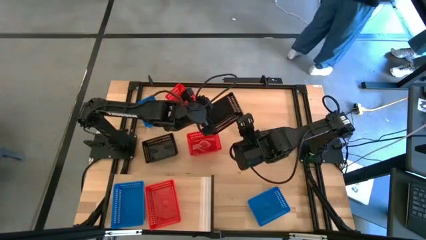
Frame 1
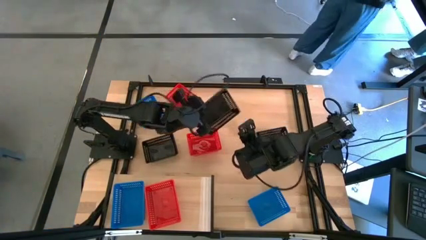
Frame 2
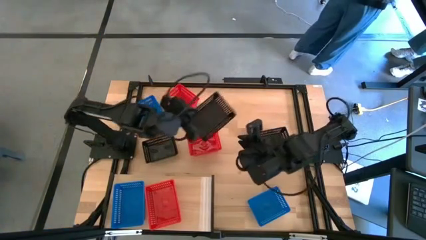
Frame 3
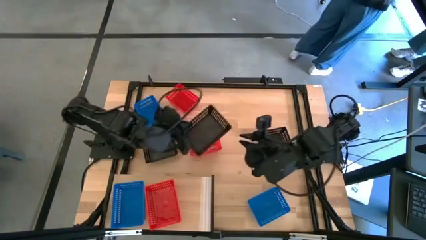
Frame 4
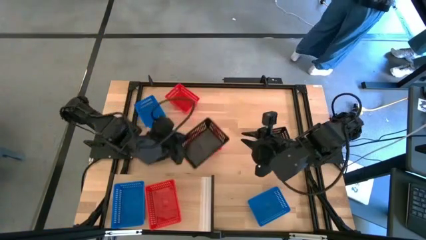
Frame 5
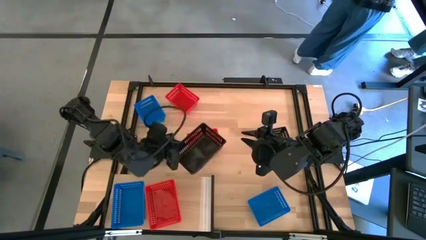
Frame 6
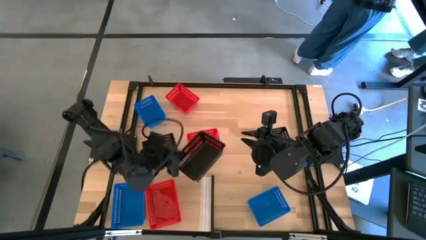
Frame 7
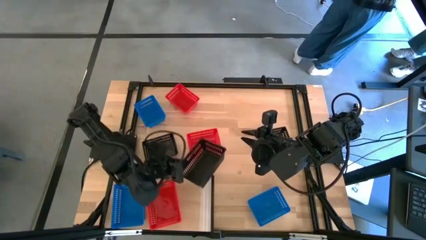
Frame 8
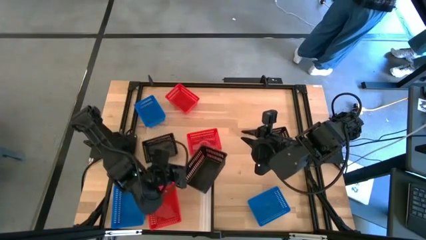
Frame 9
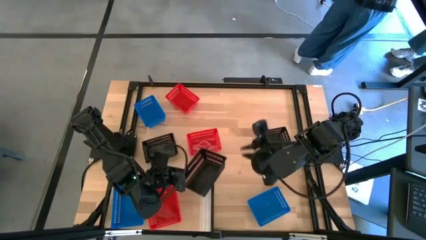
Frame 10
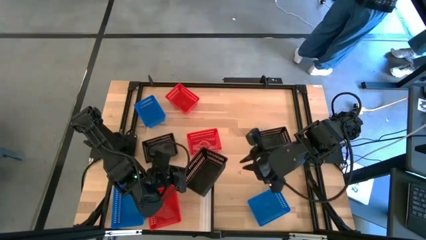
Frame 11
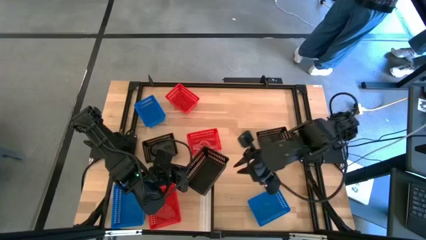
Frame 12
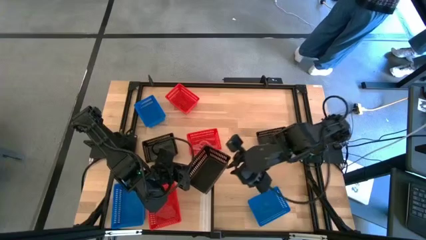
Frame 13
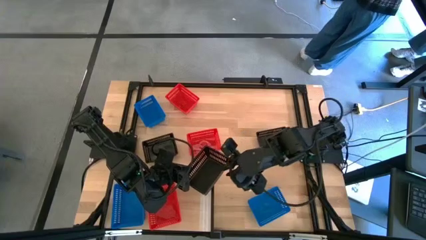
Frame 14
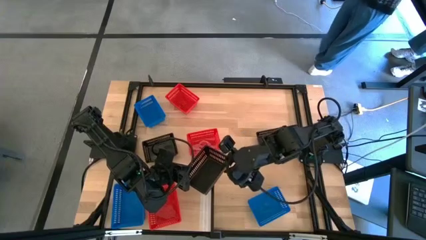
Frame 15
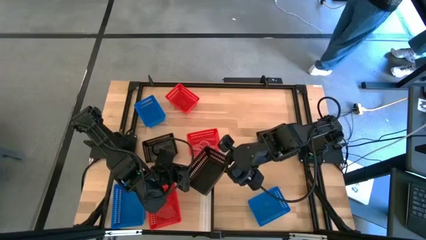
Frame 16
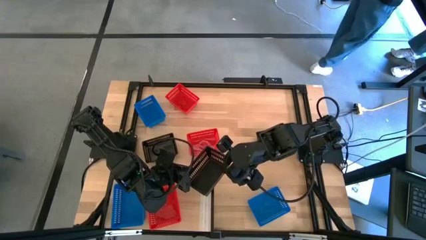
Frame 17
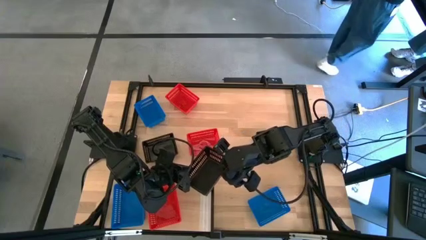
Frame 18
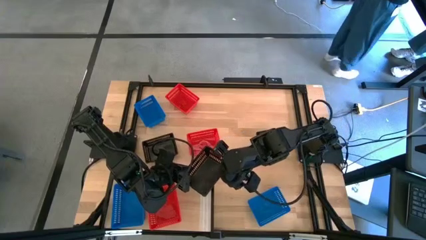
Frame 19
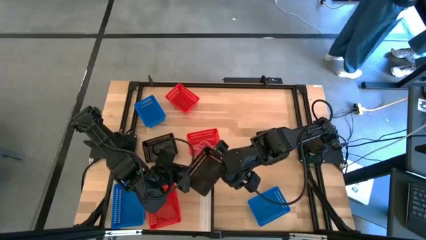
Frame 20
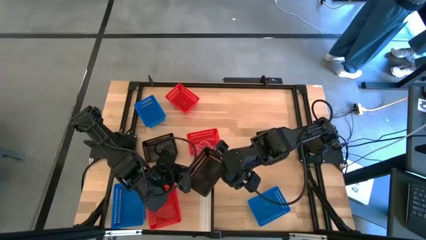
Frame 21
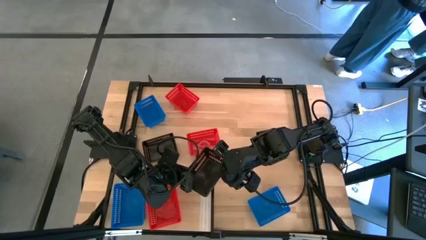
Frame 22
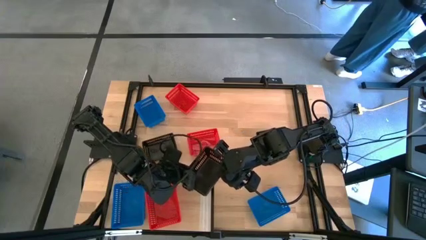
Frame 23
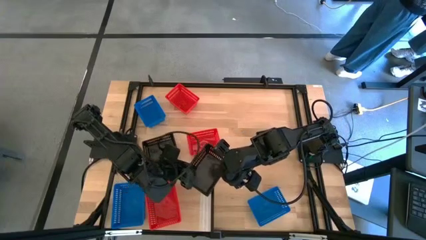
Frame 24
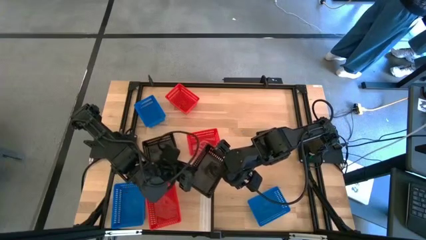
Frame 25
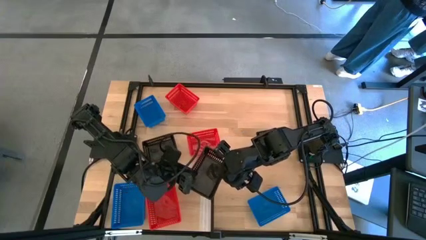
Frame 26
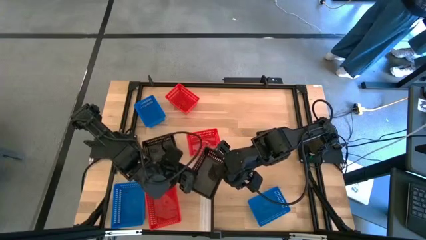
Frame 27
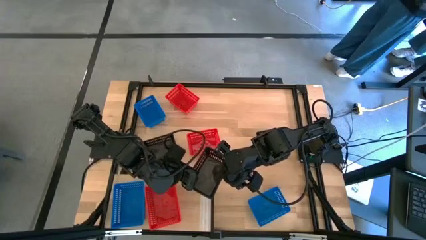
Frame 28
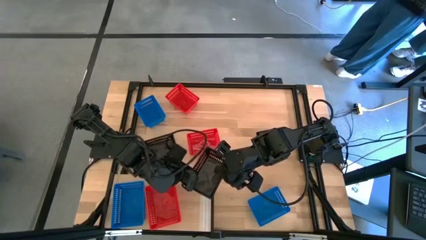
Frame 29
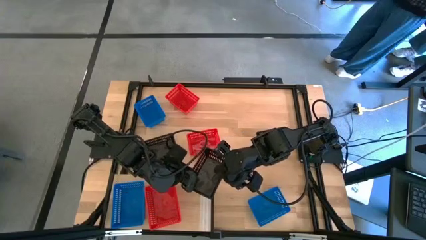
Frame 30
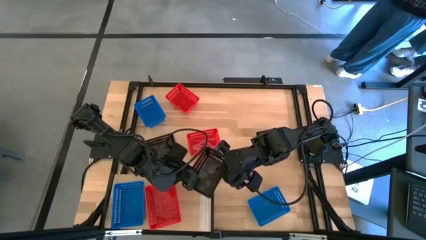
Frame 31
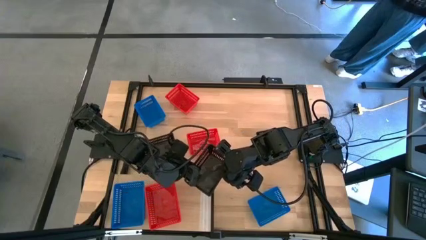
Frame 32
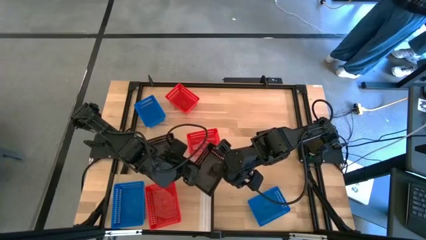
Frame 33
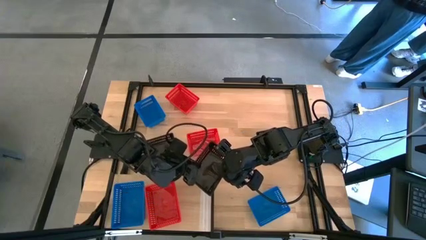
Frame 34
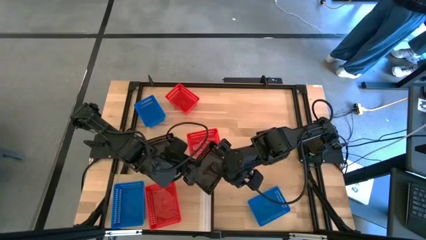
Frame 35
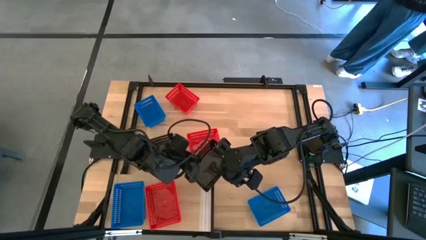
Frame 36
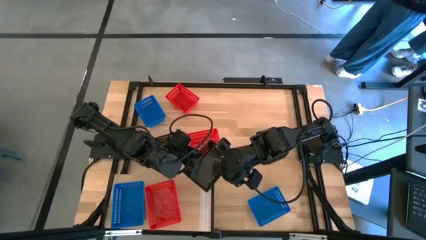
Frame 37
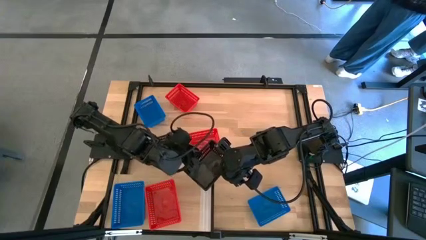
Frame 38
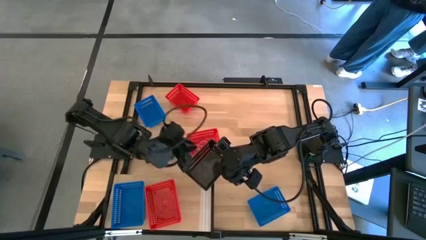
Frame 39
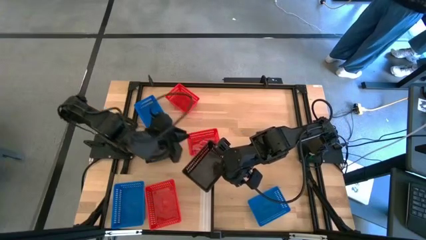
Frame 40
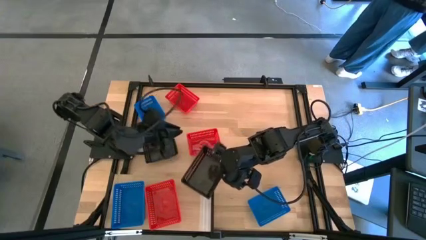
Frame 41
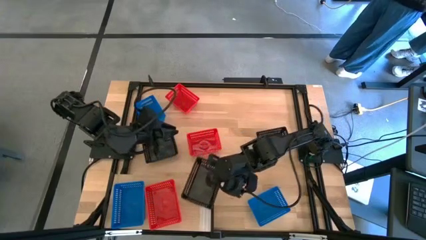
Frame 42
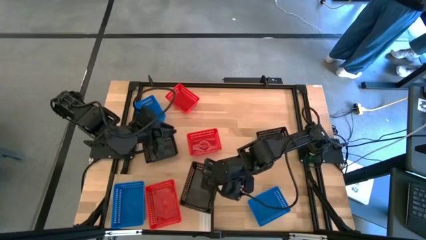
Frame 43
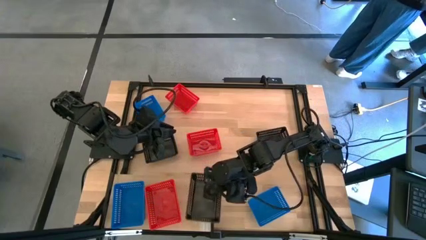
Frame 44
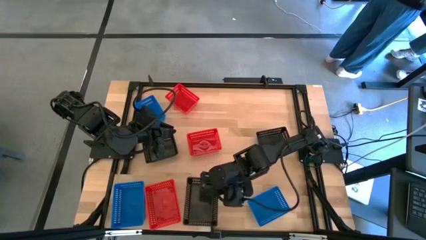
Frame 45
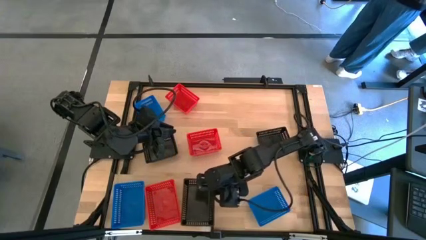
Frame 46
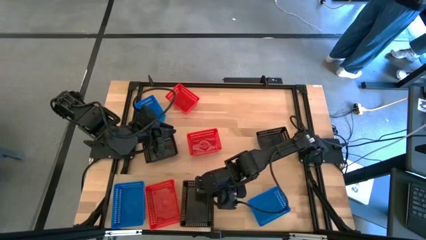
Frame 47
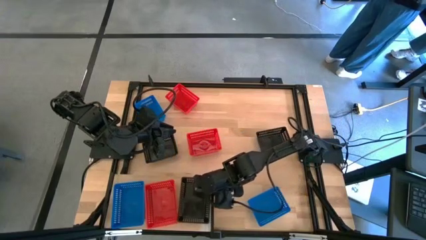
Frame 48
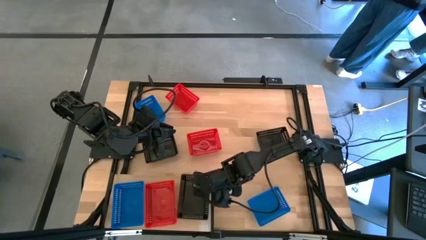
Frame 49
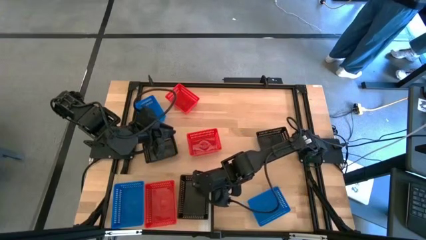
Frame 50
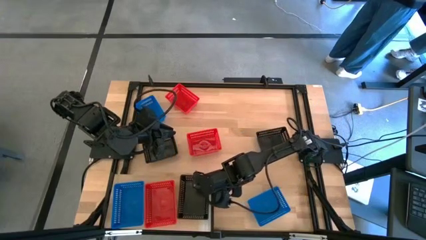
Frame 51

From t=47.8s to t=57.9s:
Task: Stack baskets on shelf by color
Put the center black bin on the shelf

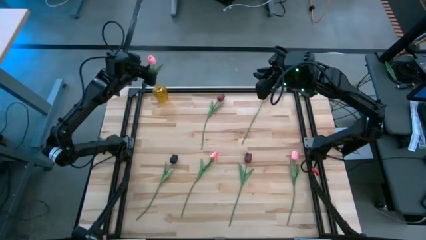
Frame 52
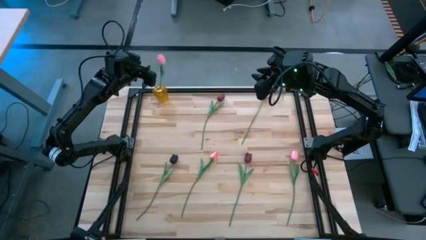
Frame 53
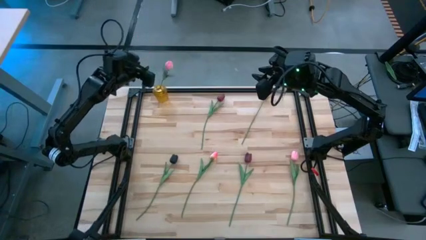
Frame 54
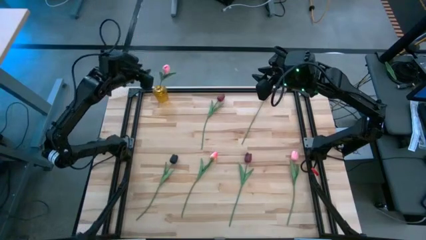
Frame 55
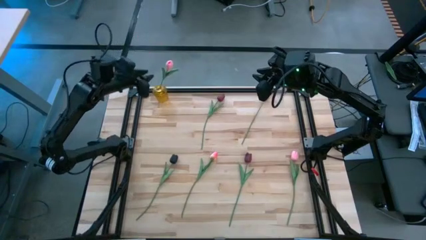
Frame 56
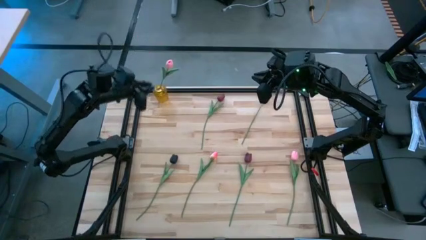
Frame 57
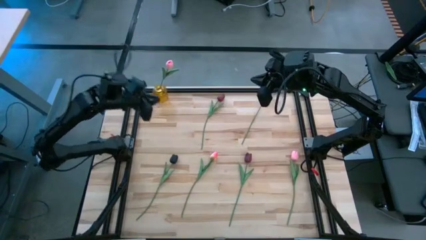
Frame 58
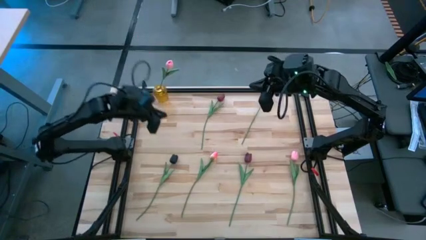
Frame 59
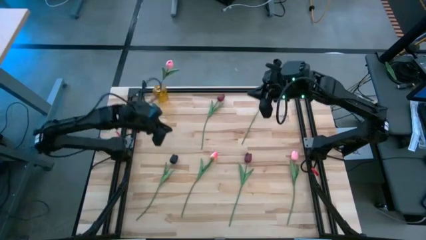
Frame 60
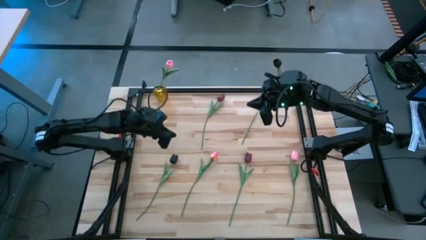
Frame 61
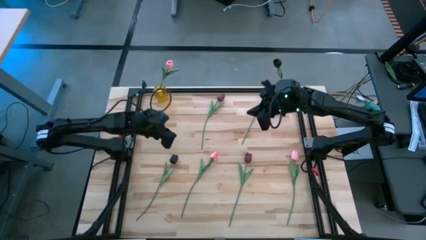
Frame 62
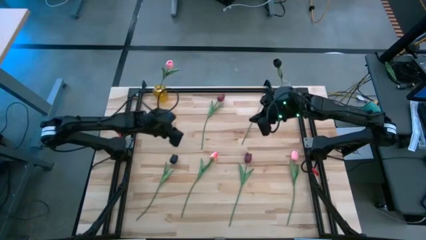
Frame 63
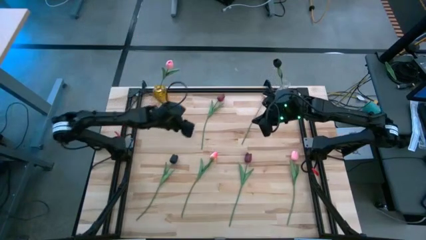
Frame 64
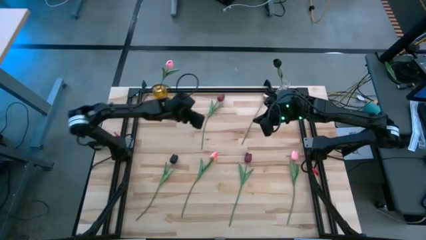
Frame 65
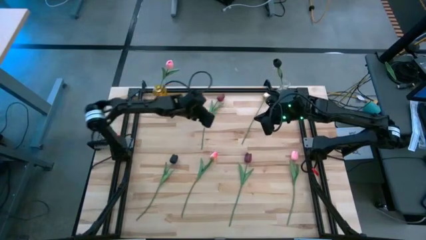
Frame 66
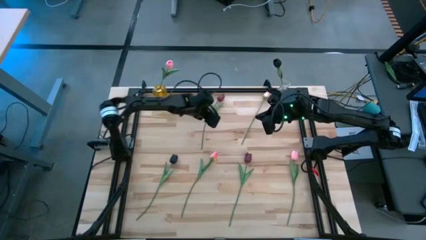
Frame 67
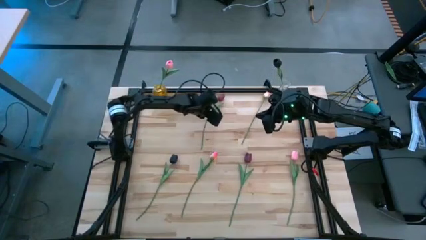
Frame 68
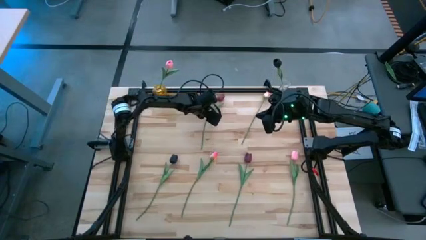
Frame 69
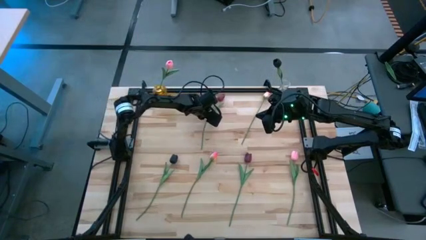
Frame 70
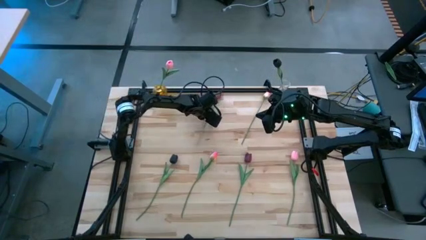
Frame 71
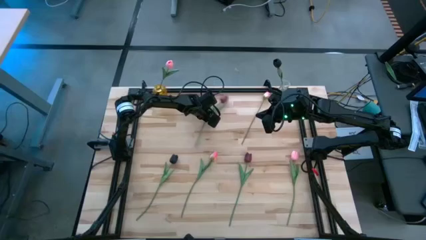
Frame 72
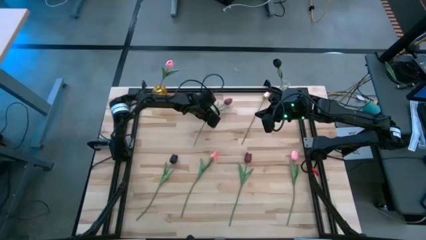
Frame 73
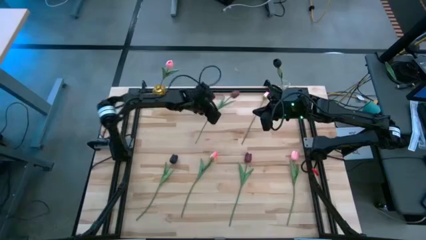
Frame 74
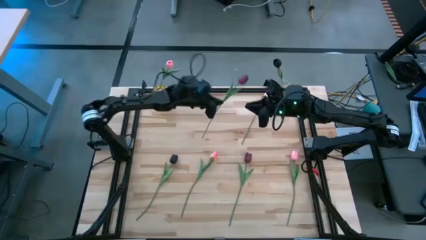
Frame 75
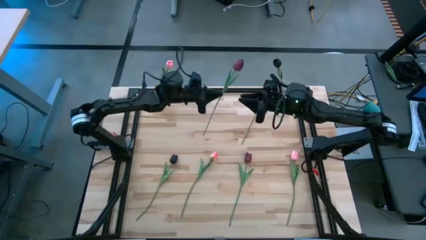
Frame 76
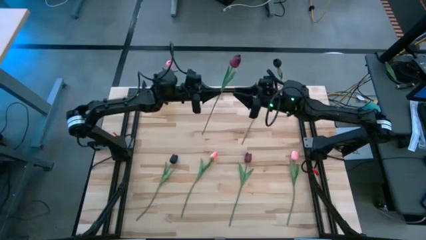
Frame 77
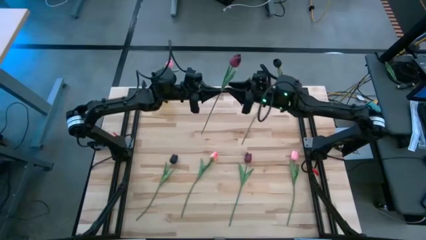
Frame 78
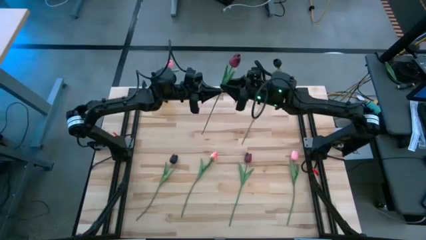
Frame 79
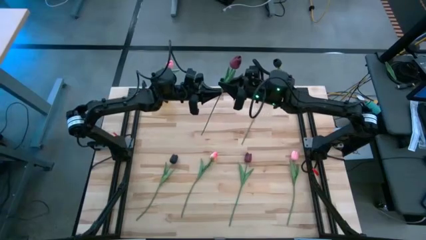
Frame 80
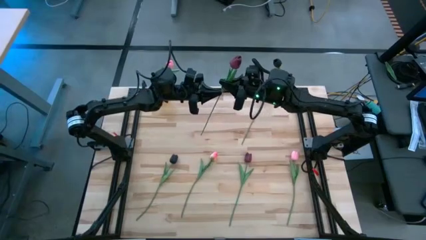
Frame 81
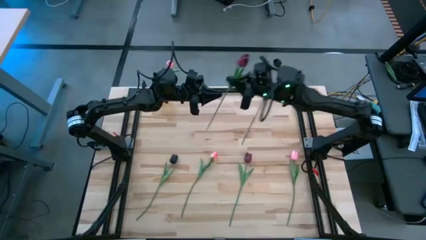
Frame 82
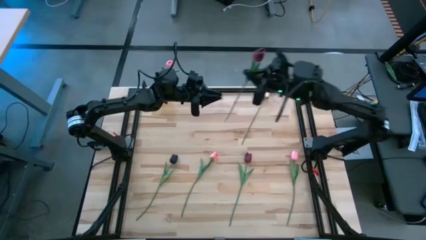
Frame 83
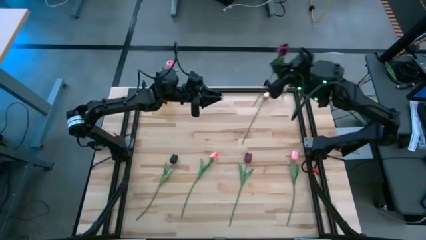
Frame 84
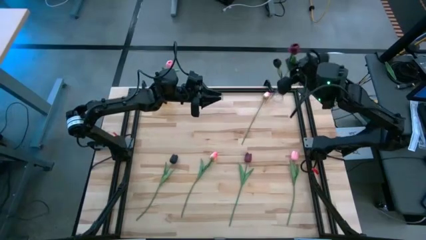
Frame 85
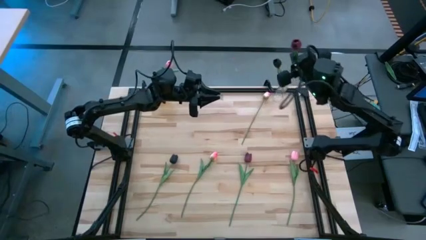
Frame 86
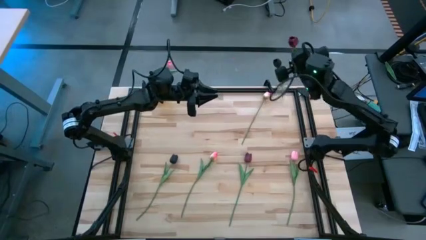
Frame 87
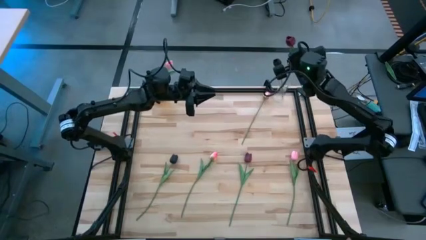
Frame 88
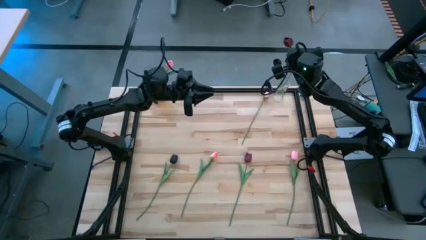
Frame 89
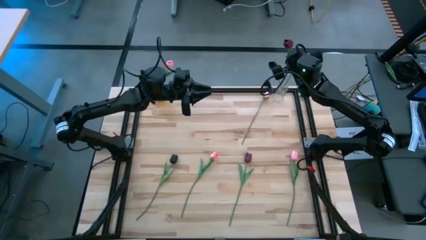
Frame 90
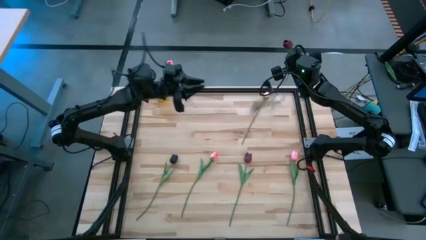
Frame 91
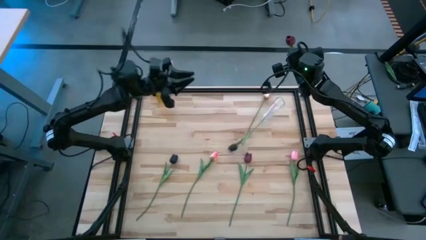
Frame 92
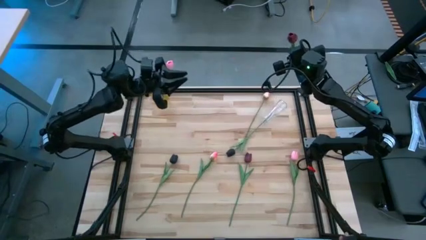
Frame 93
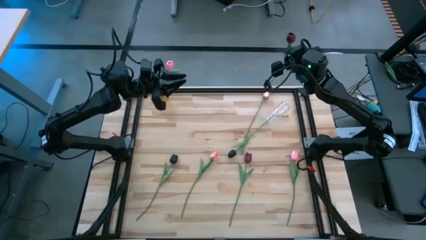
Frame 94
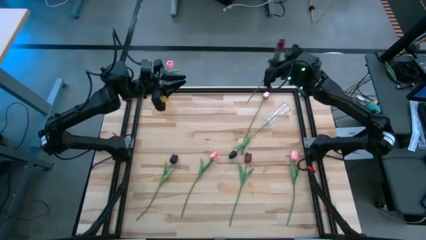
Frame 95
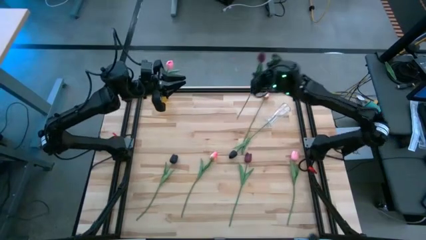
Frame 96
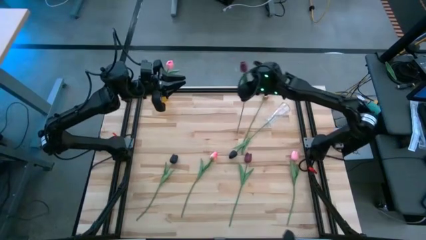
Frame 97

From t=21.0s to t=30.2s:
Task: Sort flowers into vase by color
Insert the top dark red tulip into the transparent vase
